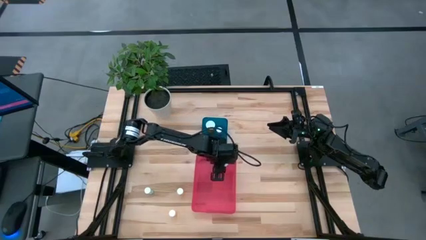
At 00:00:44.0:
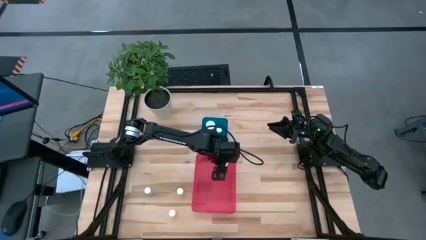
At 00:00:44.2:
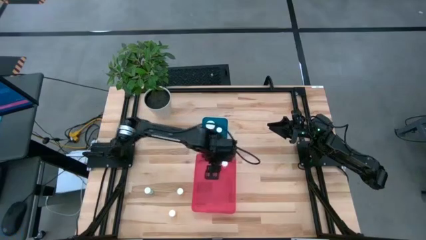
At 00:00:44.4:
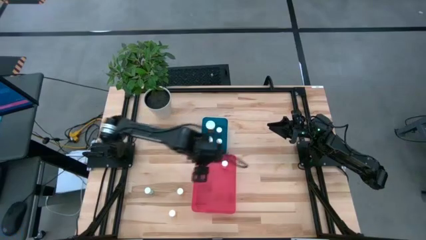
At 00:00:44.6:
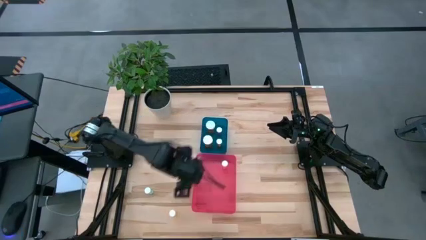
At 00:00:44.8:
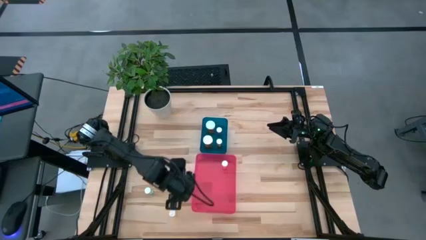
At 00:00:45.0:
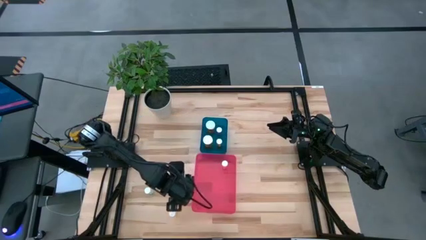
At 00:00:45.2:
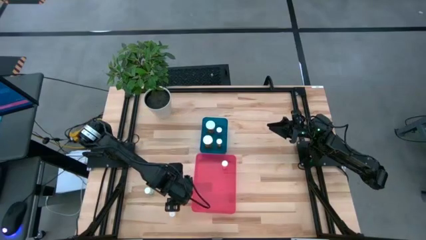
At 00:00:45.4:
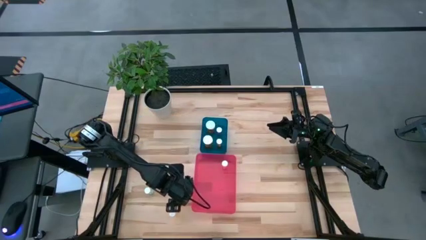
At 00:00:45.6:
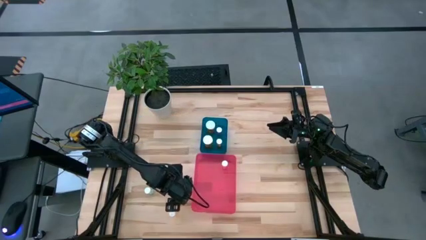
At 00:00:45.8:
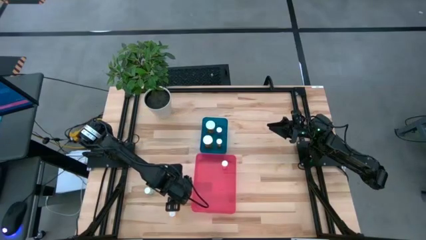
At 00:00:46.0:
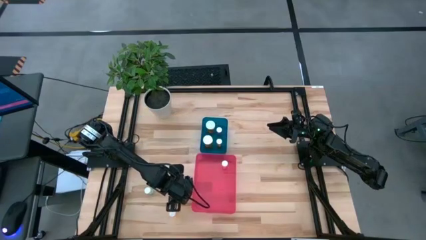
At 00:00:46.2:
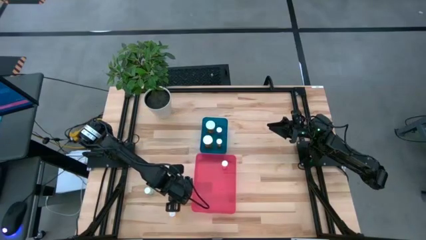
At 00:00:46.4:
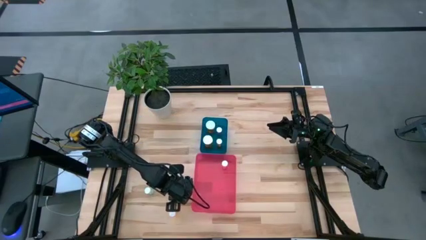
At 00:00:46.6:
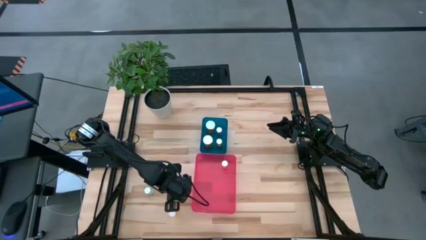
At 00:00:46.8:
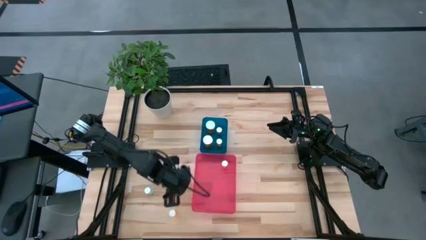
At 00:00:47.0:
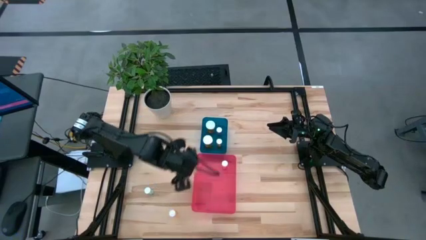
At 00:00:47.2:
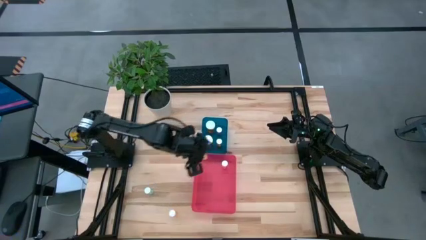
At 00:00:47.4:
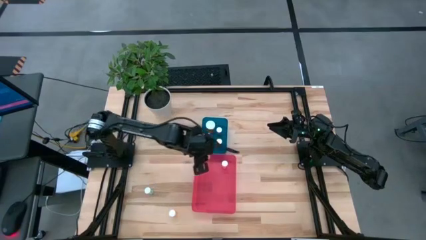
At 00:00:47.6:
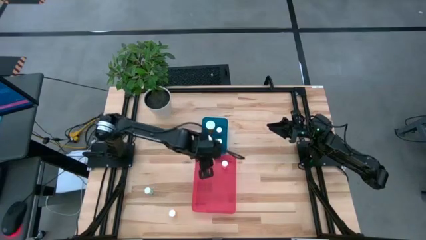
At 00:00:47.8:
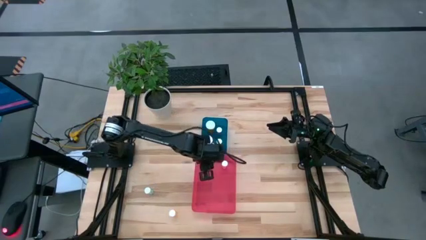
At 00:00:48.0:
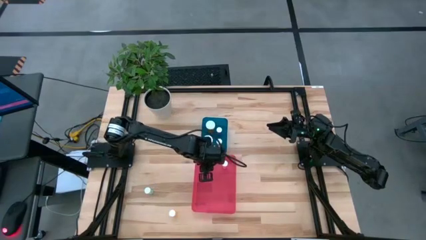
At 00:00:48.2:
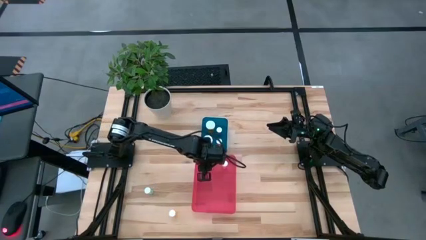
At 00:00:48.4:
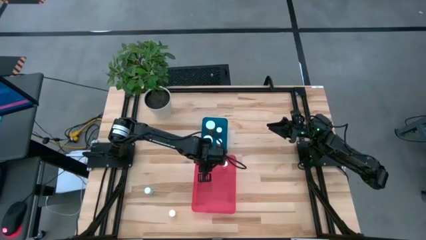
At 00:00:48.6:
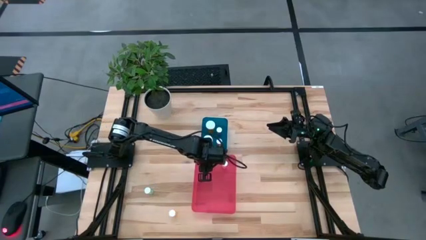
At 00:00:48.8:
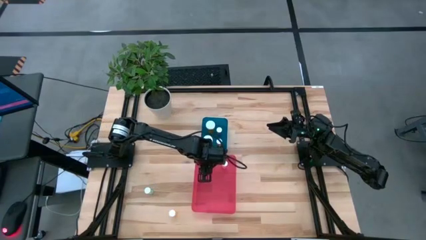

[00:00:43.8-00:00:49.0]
Task: Pick and place medicine bottles into bin by pill shape (circle, oval)
Put the yellow tablet bottle into the red bin

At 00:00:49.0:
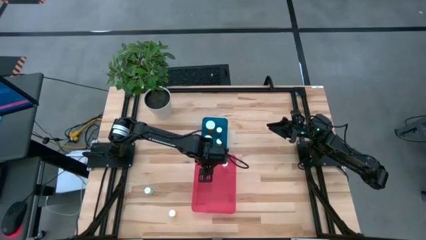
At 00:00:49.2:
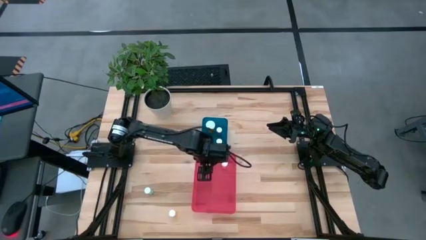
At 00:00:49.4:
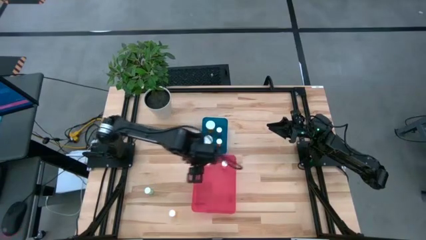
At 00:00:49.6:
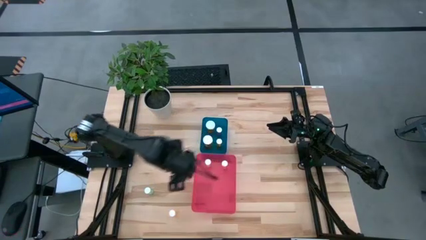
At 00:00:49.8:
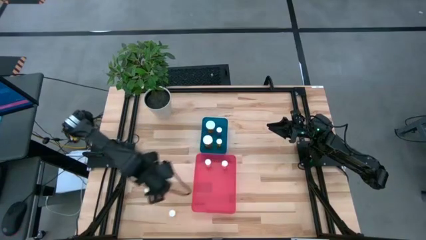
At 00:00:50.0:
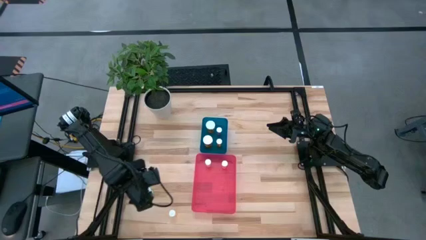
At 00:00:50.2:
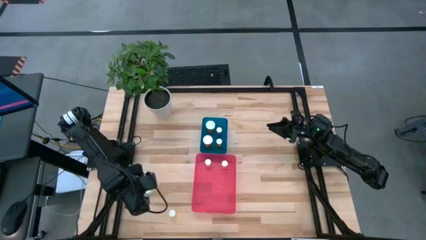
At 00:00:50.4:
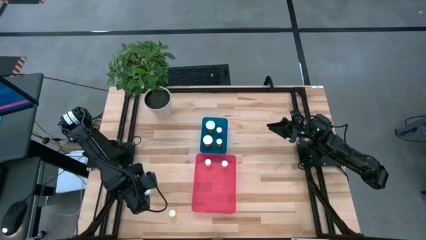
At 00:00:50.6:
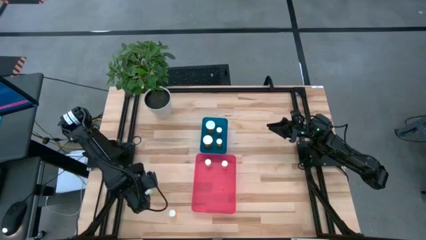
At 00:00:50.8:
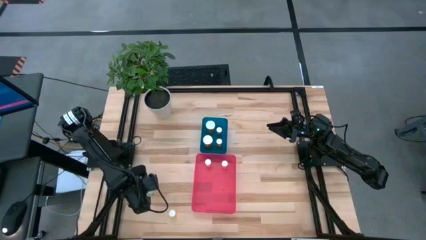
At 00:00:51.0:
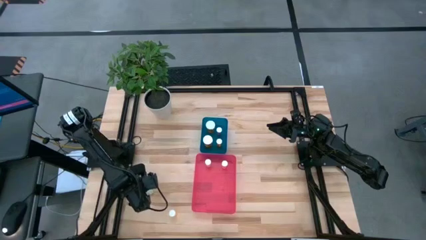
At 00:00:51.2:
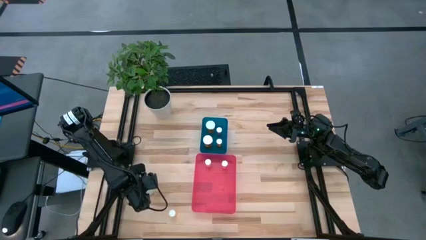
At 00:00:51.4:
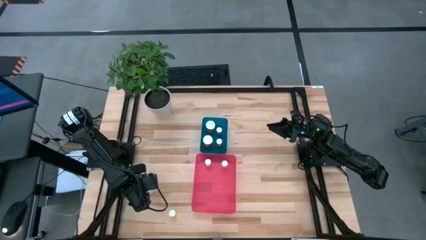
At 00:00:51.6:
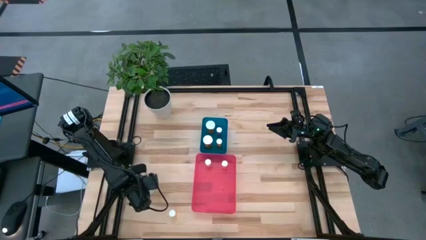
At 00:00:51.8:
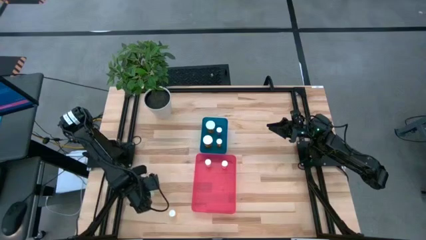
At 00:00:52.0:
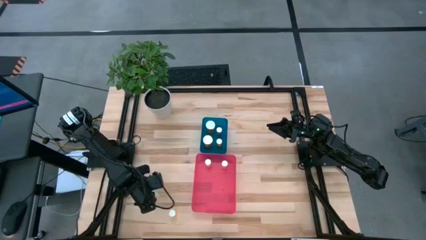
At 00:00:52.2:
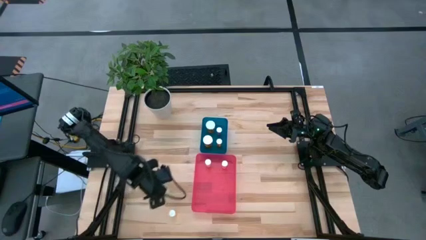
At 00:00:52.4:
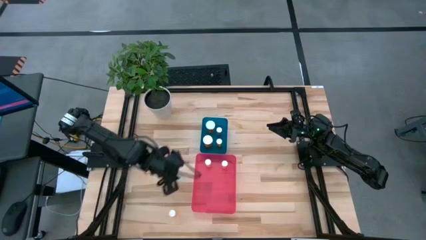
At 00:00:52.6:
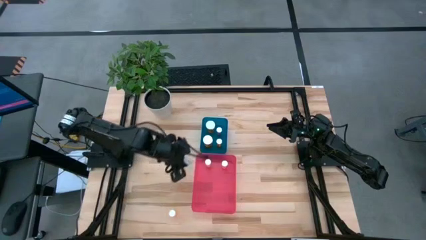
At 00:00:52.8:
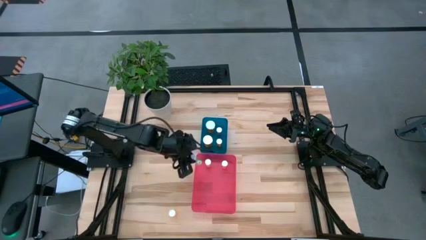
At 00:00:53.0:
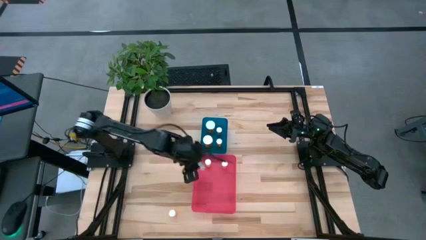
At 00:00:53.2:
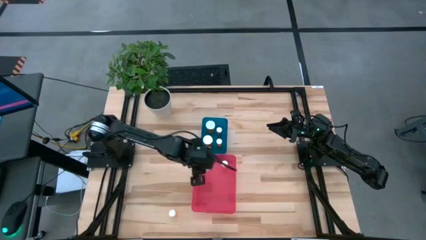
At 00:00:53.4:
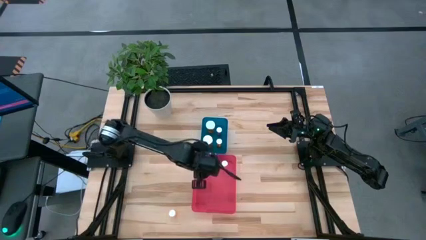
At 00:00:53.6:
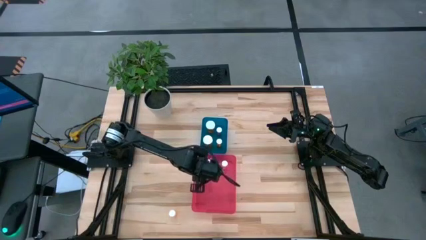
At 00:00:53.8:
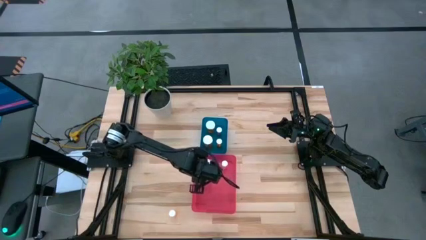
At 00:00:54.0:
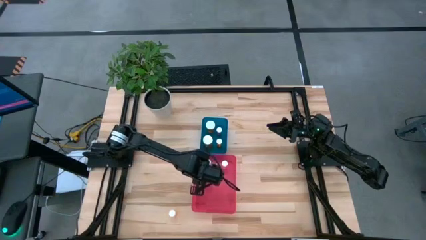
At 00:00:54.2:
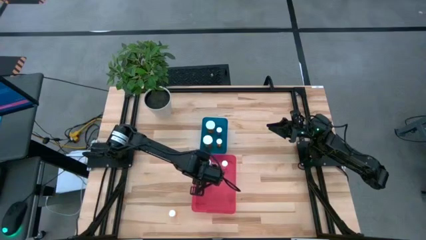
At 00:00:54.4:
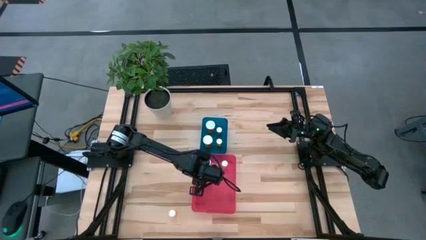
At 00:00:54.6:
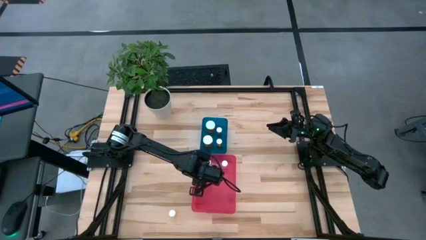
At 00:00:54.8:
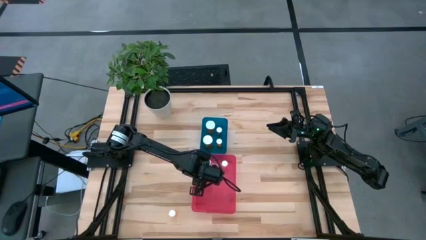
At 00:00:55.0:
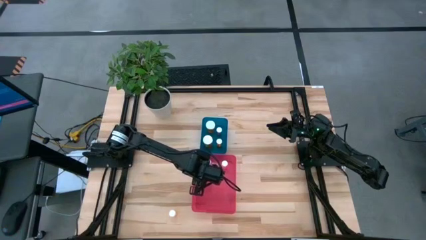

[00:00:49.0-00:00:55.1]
Put the green tablet bottle into the red bin

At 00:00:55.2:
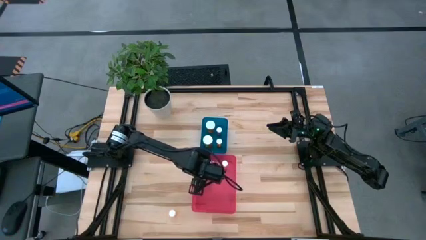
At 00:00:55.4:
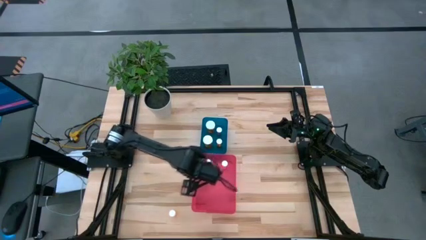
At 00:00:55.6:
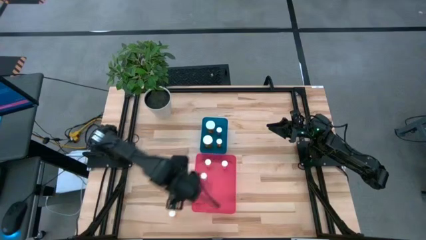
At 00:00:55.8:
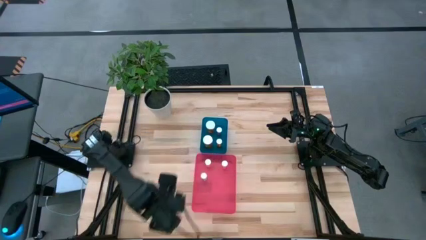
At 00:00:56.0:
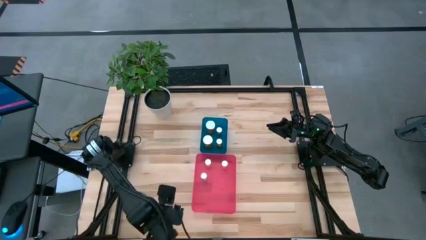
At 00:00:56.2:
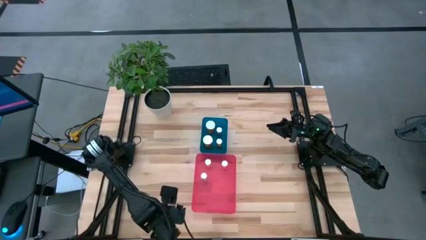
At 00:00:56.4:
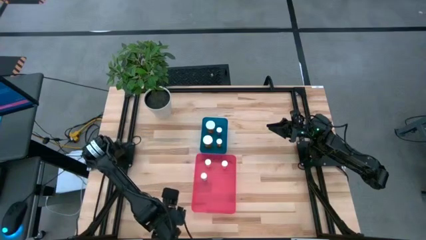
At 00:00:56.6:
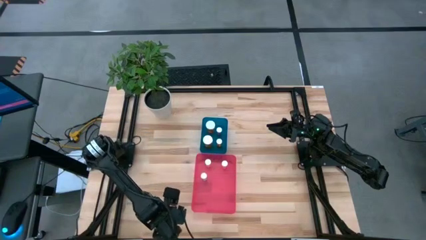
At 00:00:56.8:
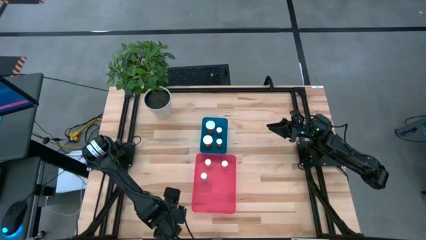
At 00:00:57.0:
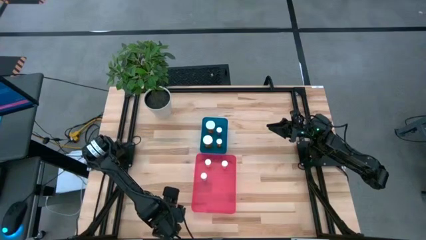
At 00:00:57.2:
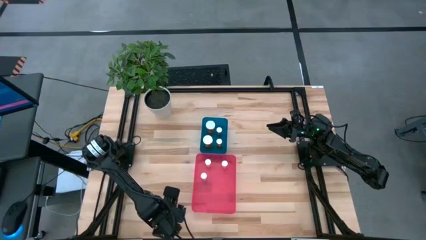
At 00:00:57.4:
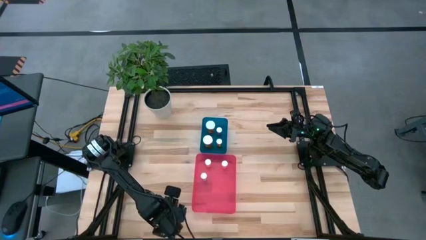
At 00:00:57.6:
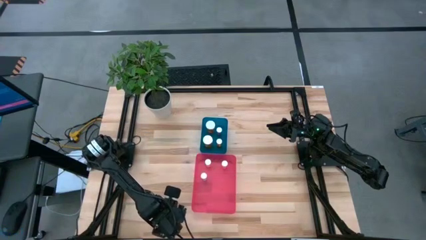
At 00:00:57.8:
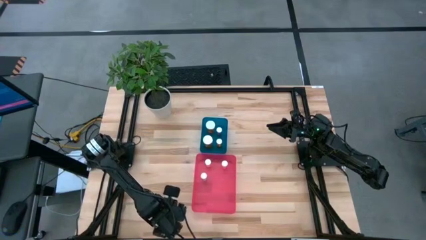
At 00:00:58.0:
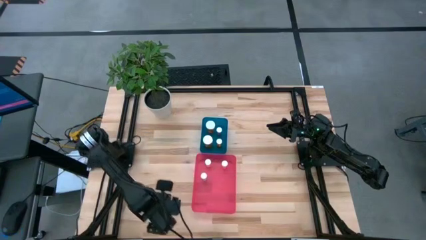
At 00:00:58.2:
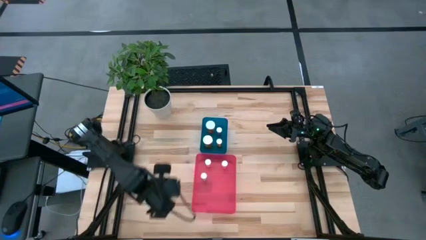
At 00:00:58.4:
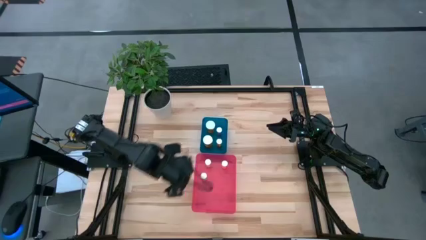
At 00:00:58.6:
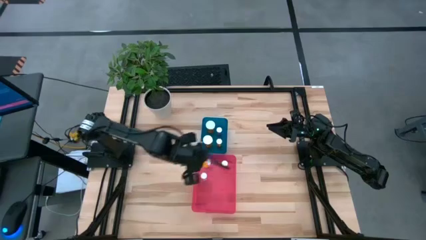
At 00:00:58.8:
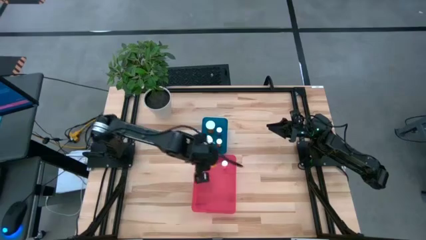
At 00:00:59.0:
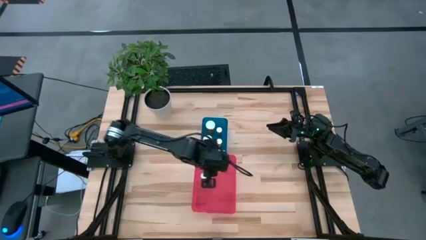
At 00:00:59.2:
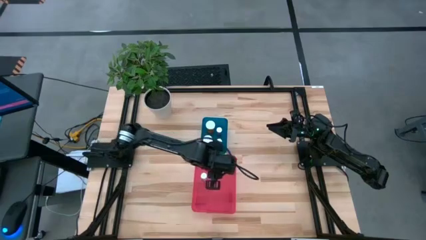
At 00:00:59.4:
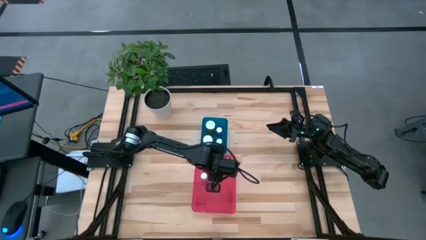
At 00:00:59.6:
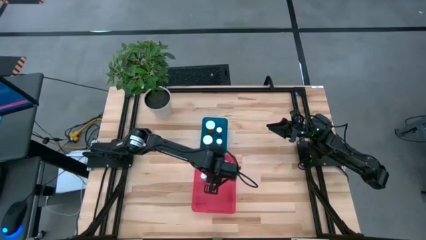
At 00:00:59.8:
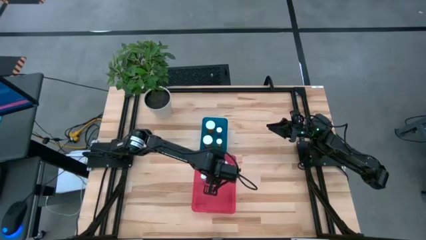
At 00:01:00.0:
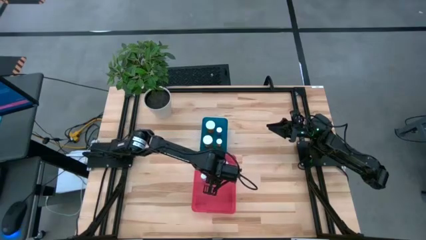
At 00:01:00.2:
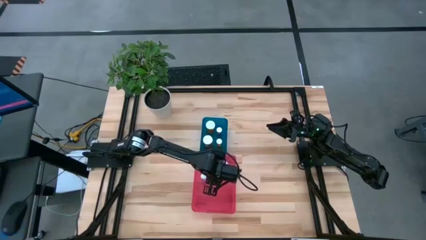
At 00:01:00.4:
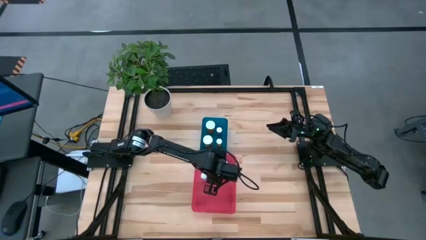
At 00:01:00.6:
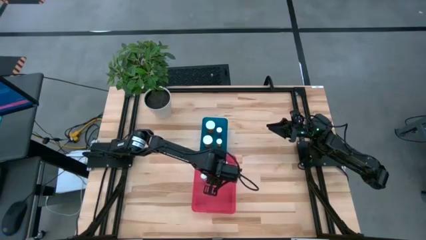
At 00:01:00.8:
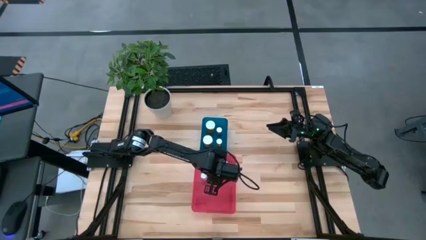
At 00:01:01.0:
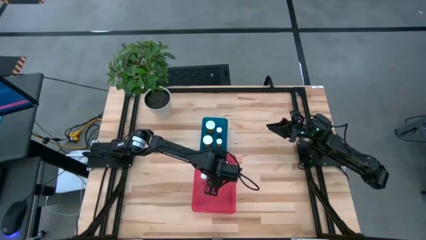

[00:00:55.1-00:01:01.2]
Put the small orange tablet bottle into the red bin
